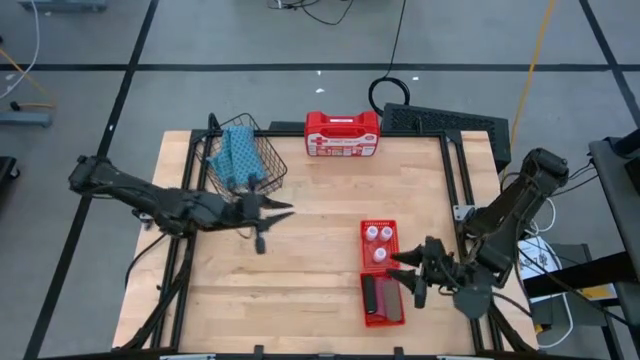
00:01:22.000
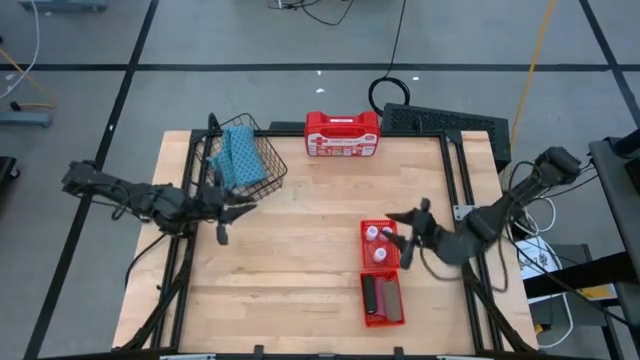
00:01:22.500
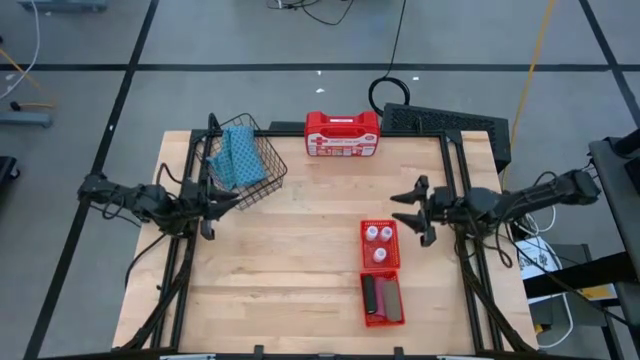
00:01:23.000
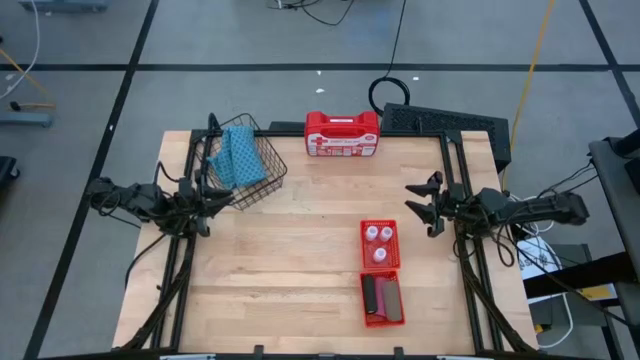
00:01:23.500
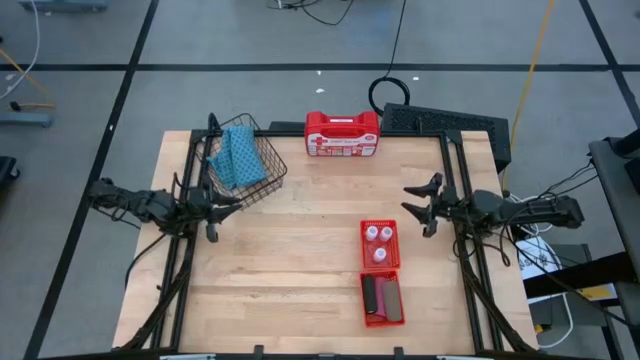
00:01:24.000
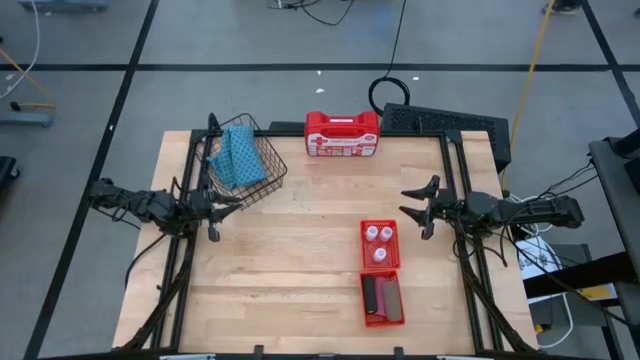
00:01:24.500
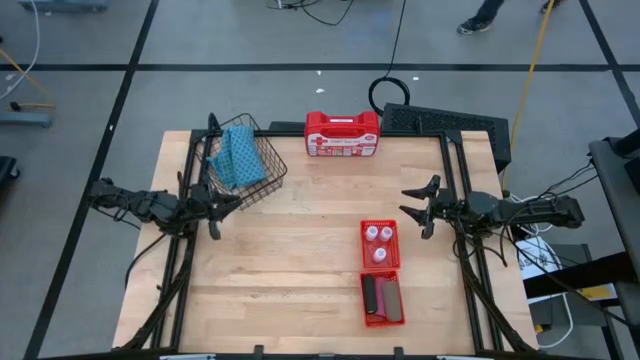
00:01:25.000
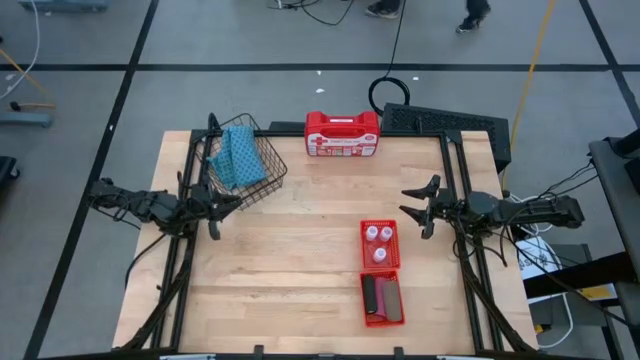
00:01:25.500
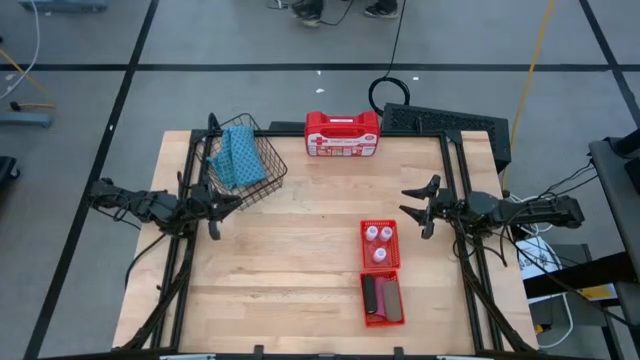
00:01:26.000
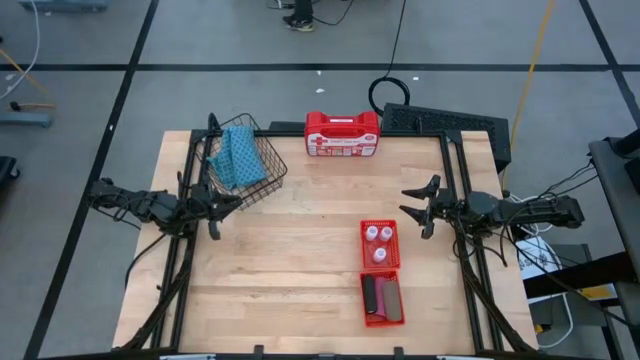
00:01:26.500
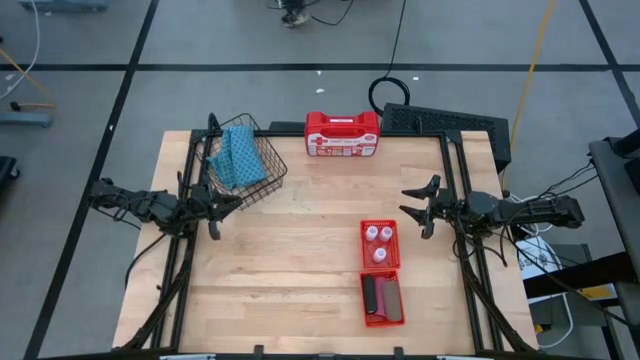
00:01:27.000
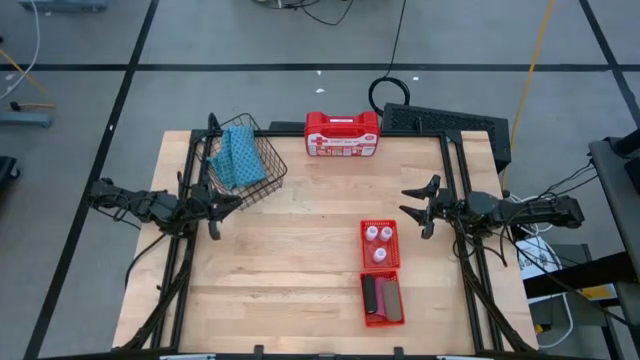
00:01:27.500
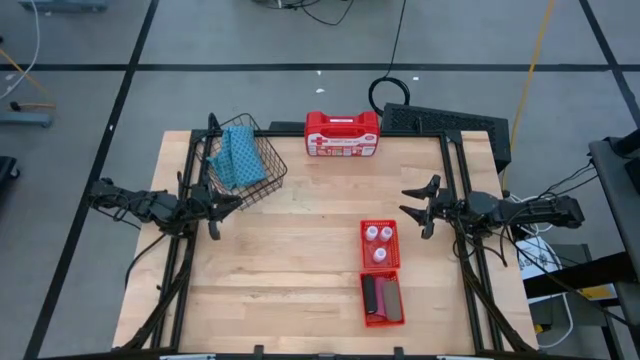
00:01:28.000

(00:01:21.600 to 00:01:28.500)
Task: Pick & Place Medicine items
Return to Home Position

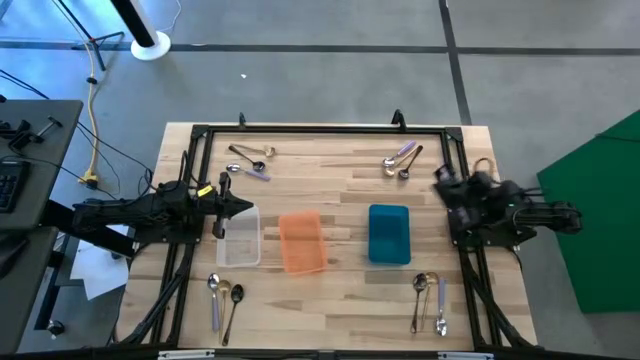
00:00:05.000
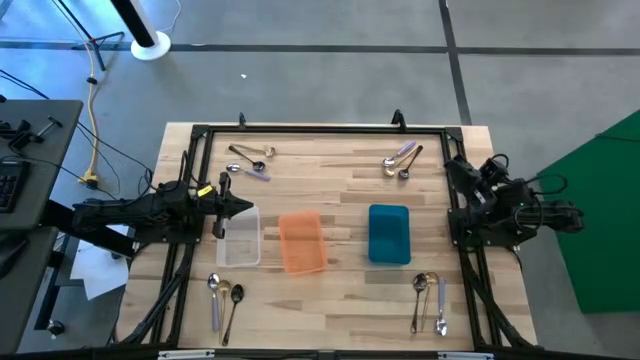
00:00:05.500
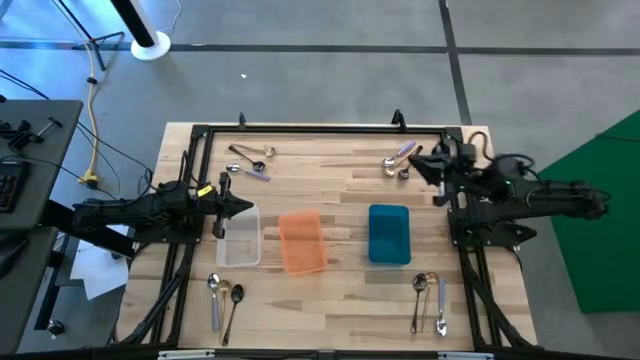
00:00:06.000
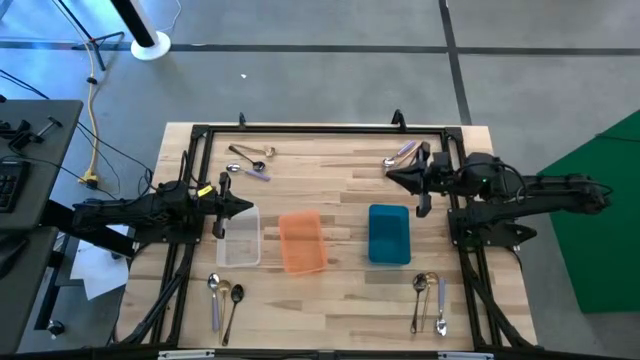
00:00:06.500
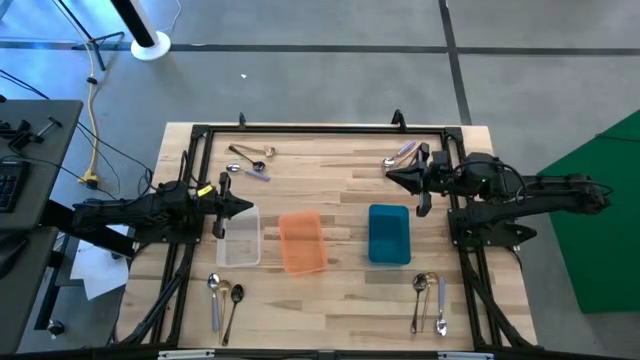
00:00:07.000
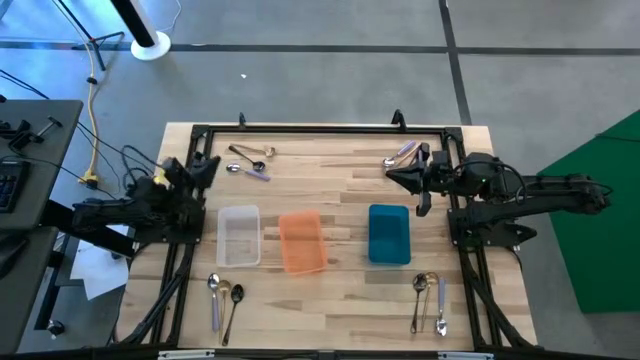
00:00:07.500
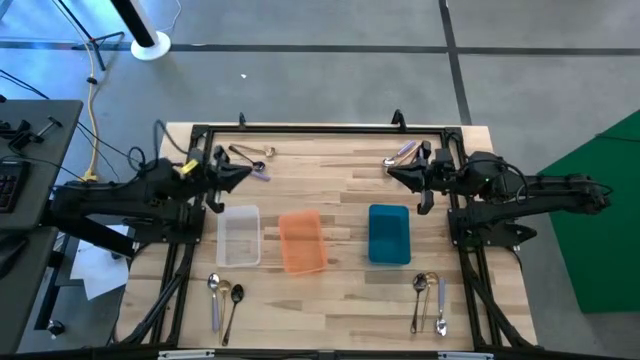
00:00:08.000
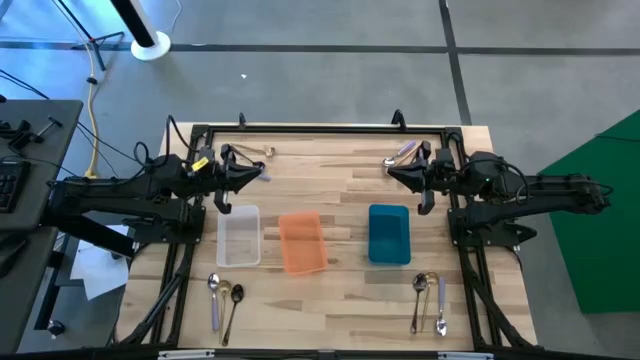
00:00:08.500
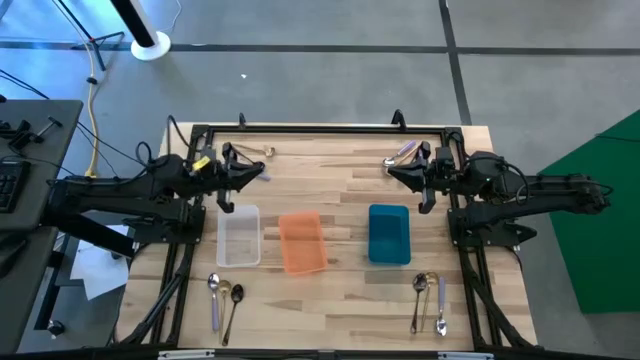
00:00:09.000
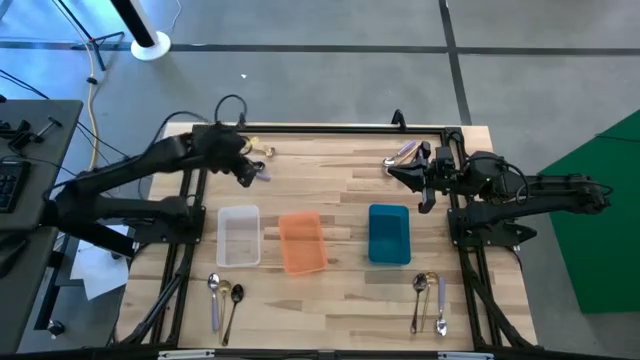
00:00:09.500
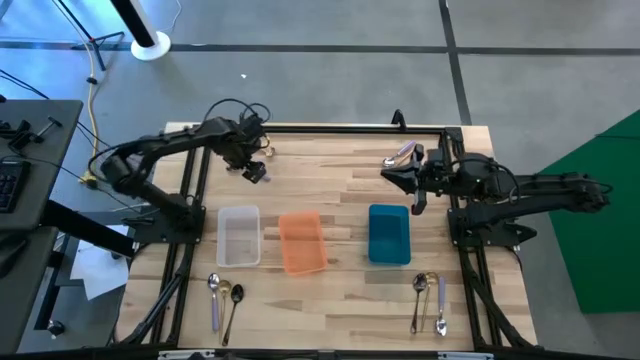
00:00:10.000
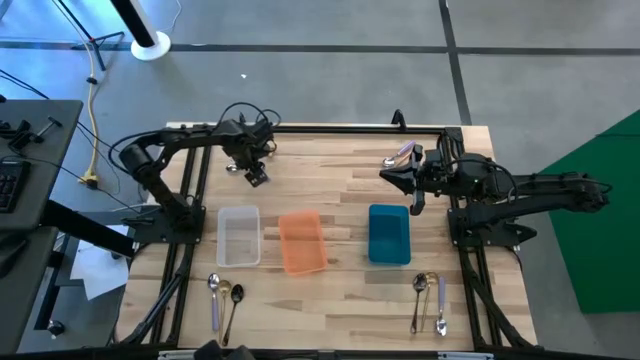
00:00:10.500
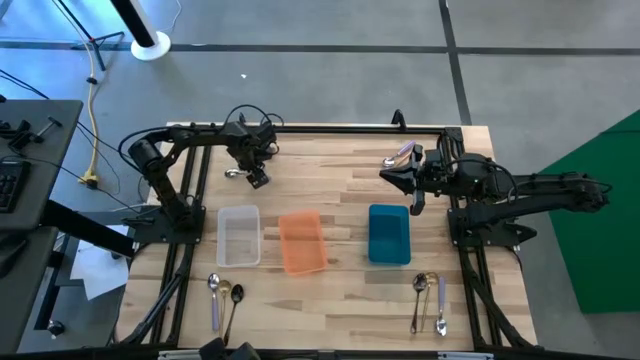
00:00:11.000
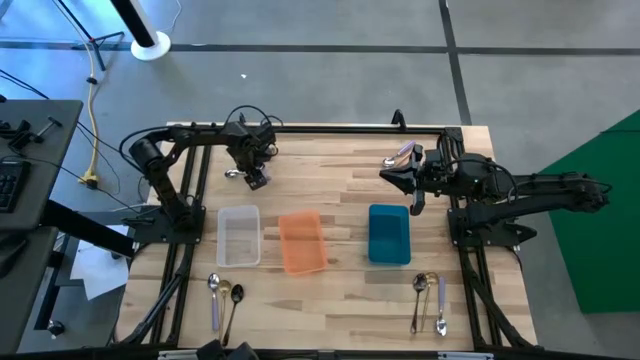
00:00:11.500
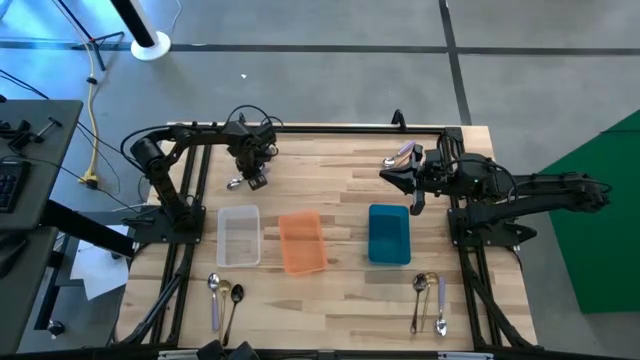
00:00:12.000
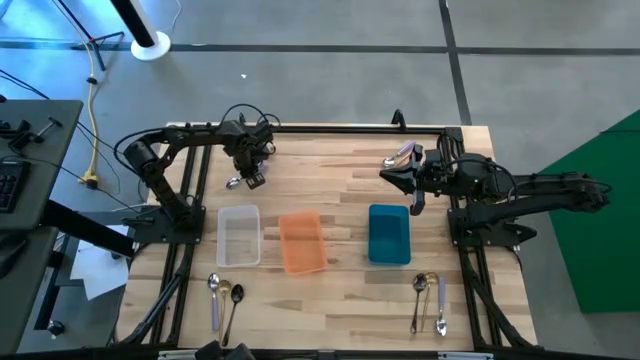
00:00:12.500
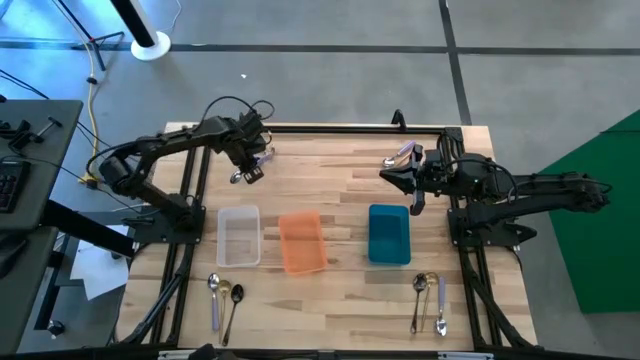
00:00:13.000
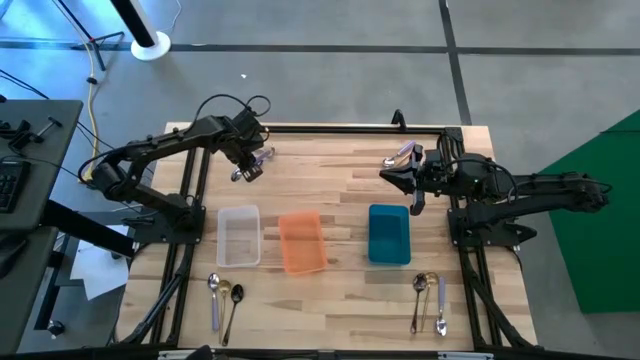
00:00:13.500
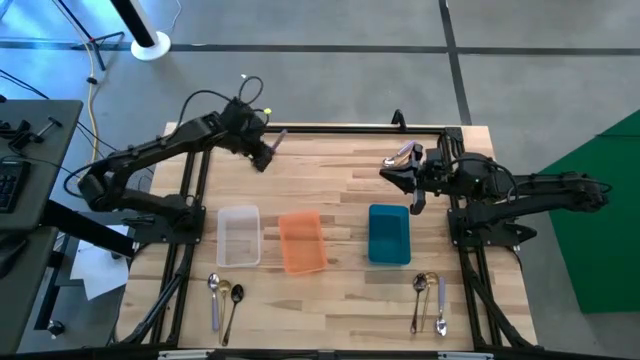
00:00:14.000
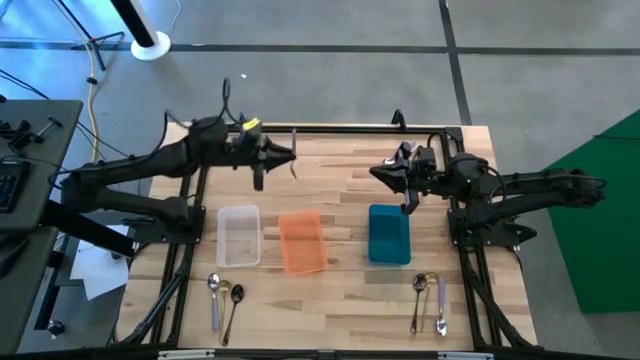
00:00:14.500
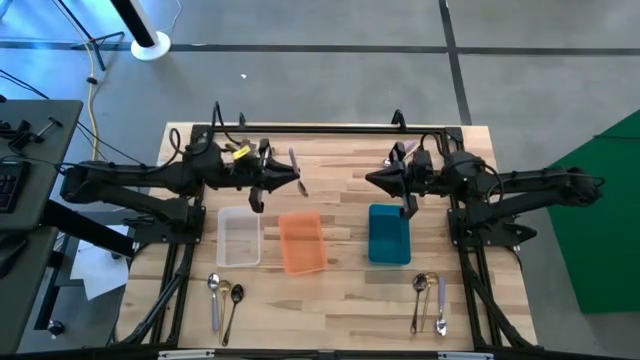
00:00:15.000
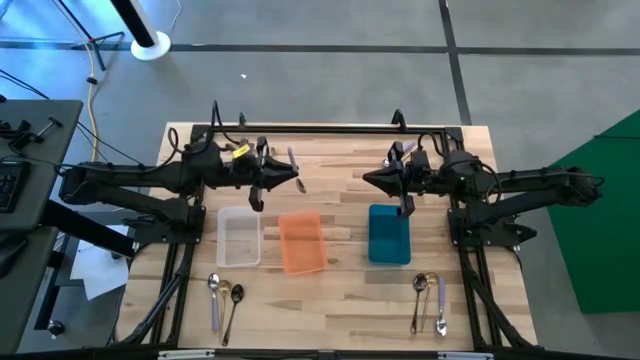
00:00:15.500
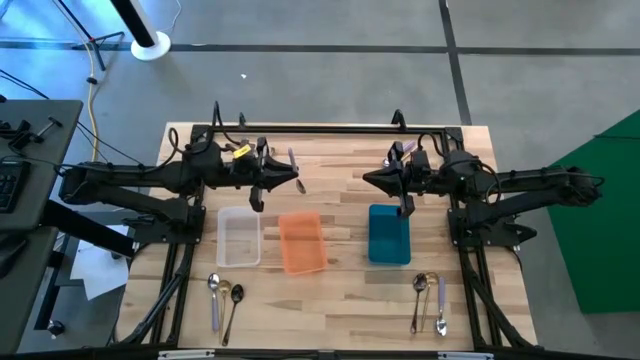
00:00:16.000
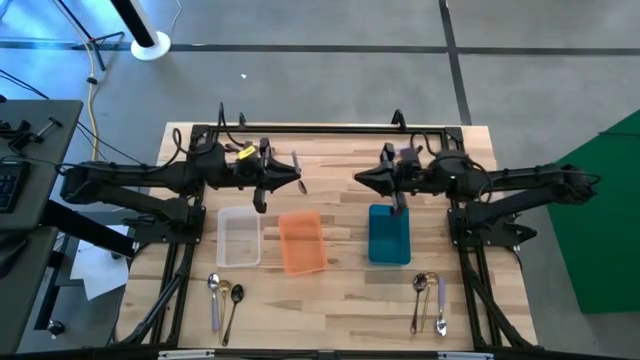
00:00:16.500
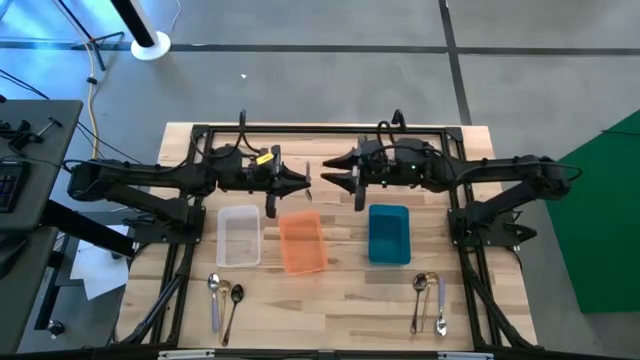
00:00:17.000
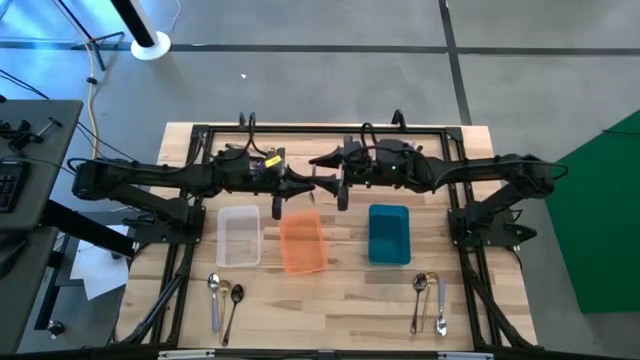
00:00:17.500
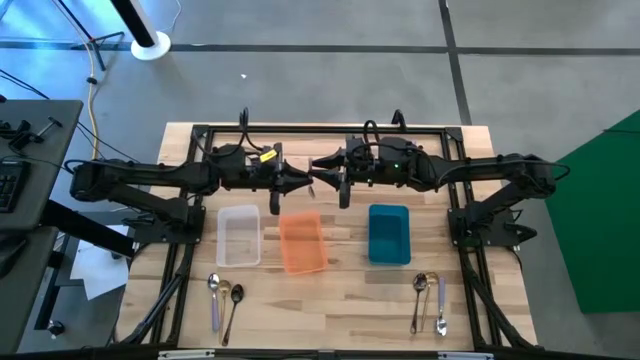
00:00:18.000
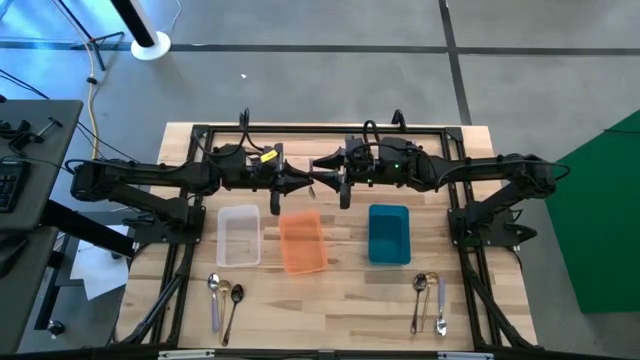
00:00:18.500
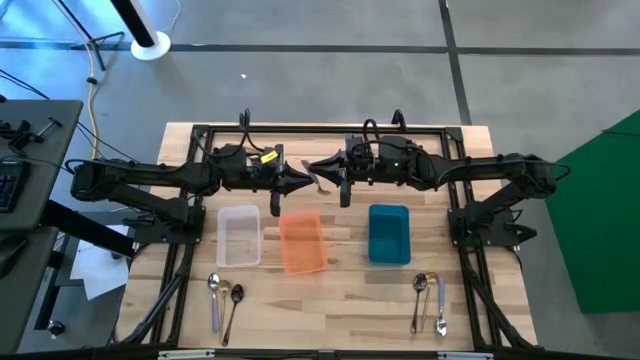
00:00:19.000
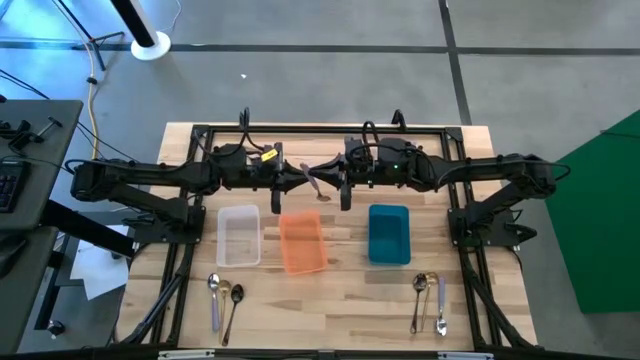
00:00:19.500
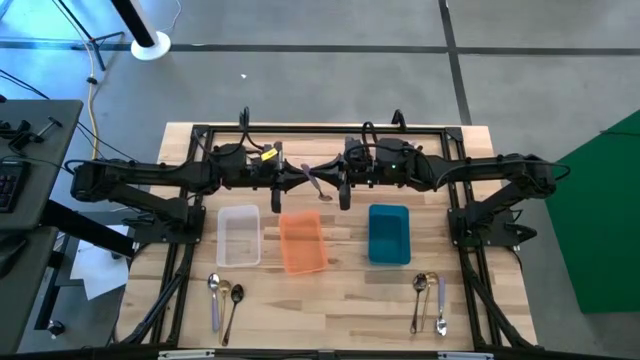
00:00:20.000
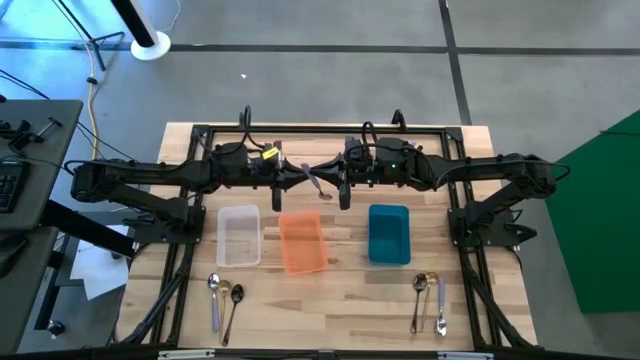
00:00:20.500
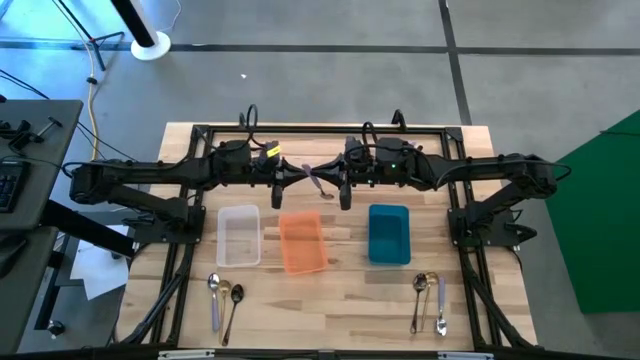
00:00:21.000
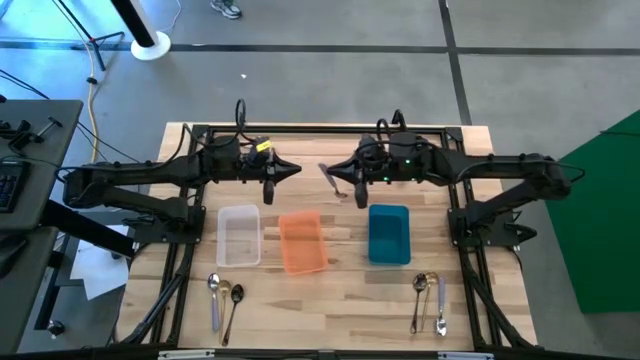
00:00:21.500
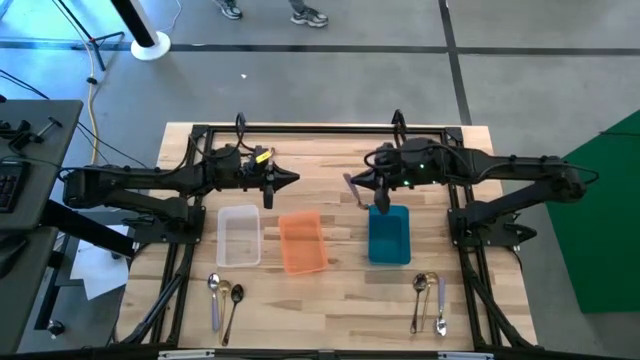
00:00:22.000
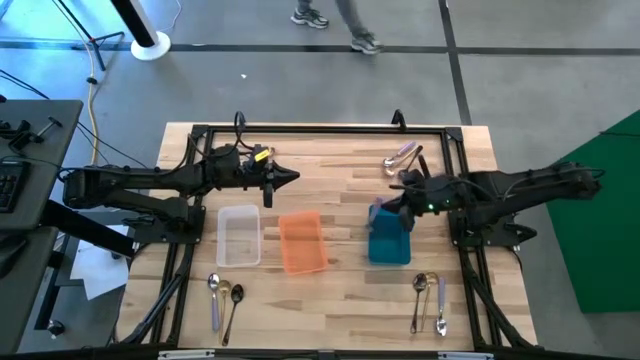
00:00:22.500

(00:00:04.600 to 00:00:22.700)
Task: Sort silverware by color (type)
Put the top left purple spoon into the blue bin
